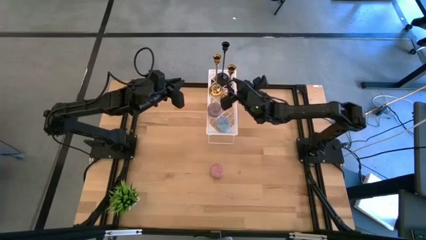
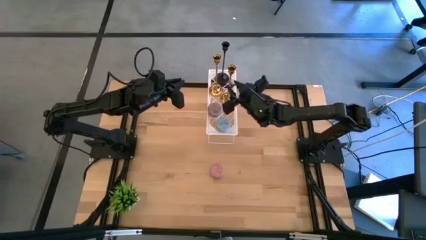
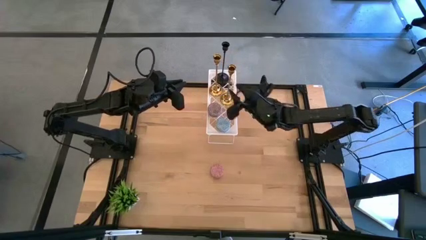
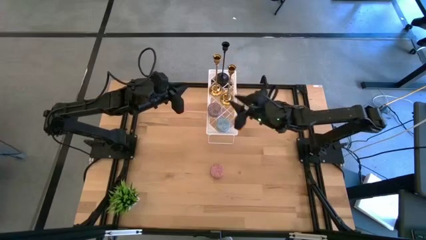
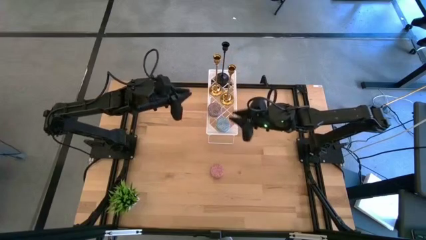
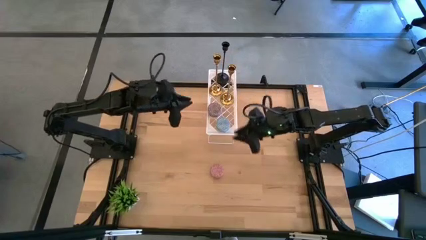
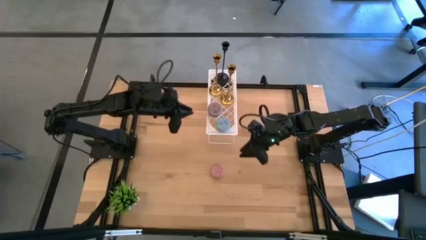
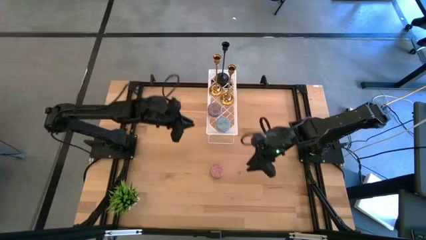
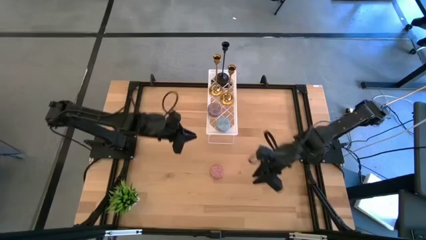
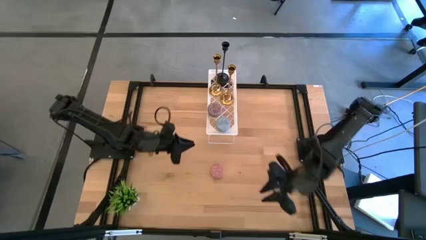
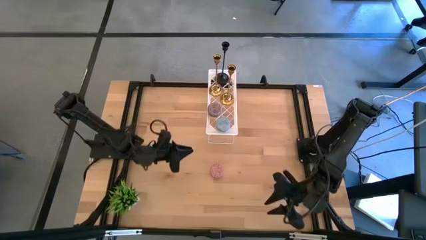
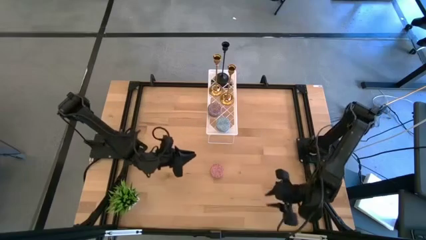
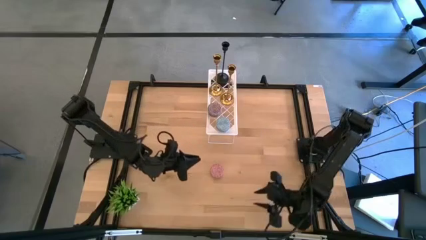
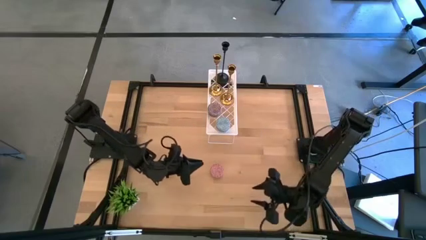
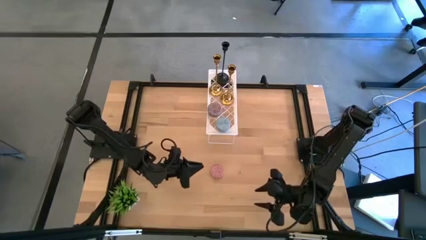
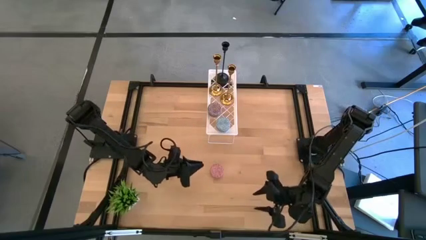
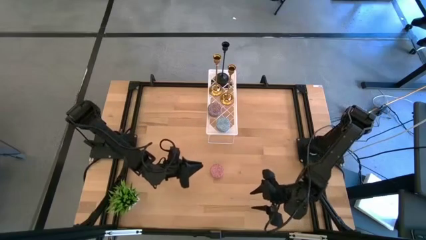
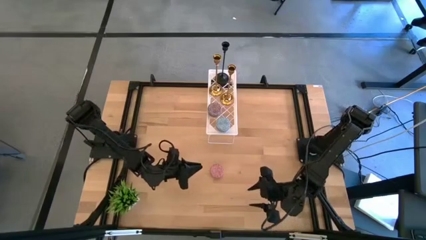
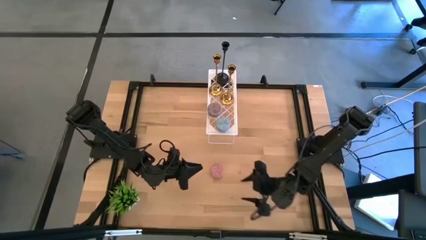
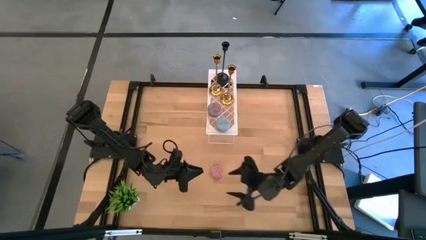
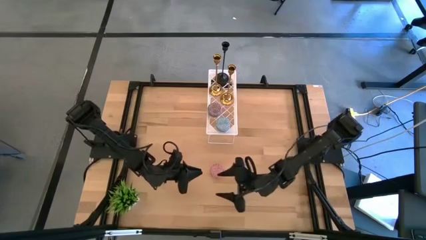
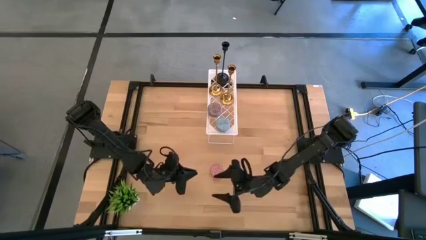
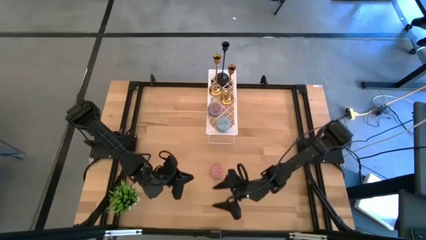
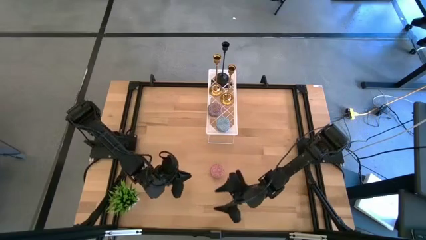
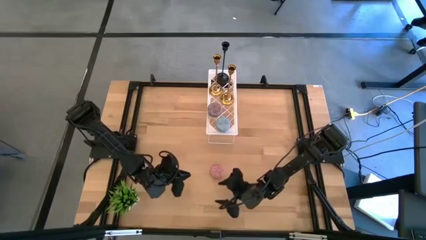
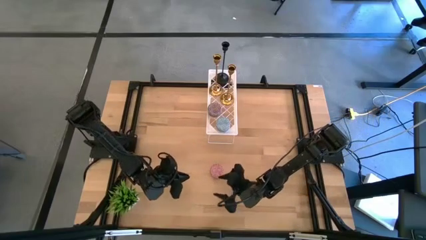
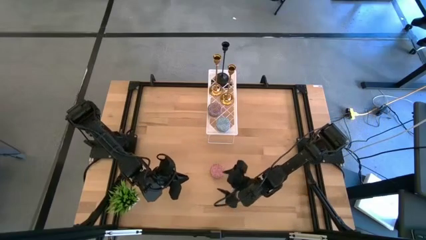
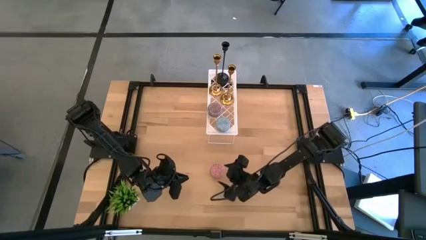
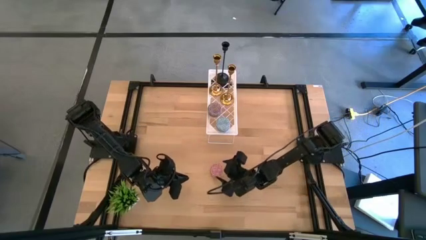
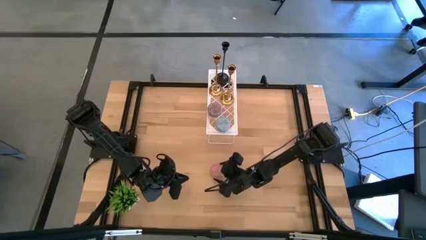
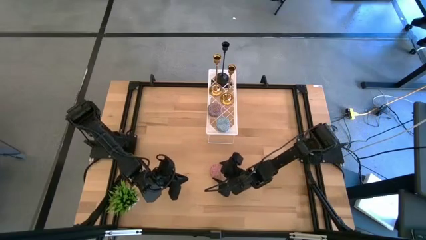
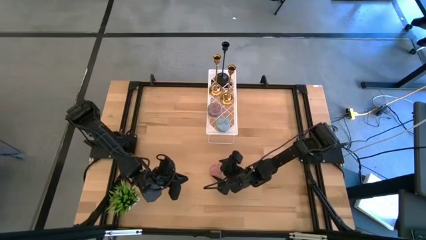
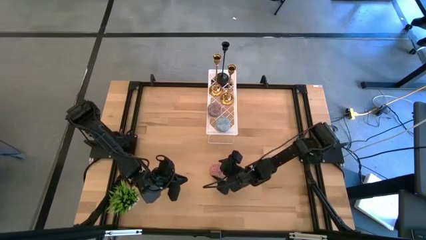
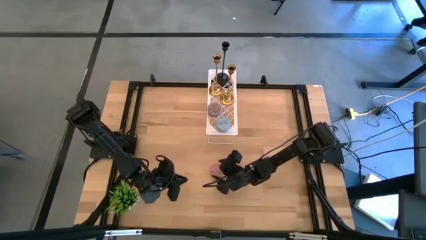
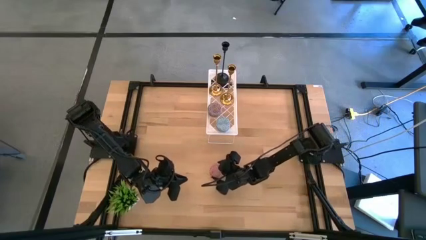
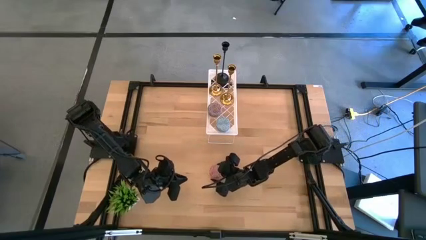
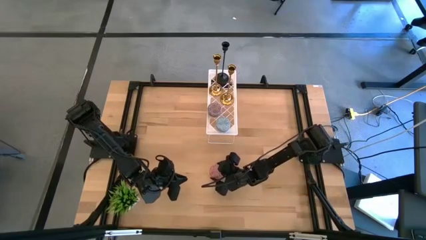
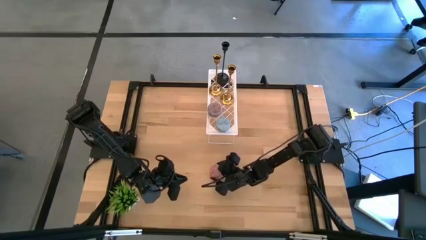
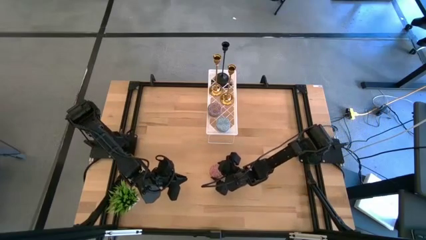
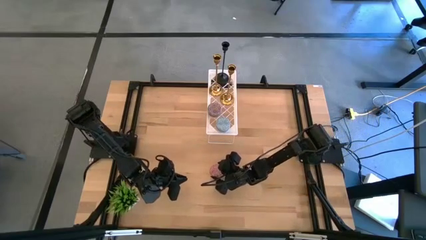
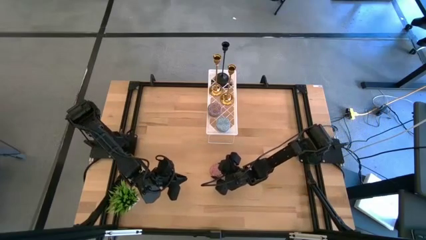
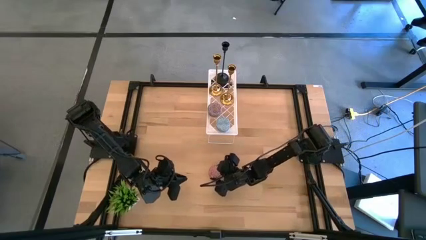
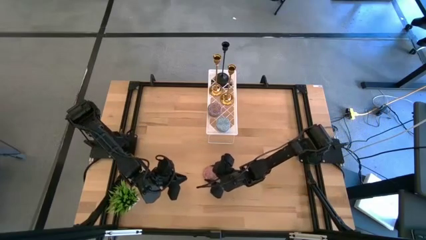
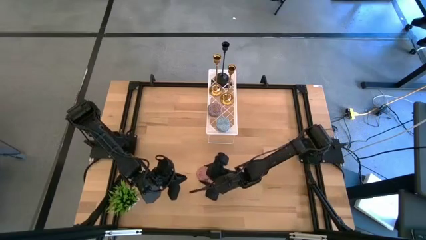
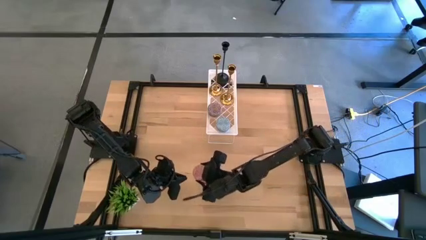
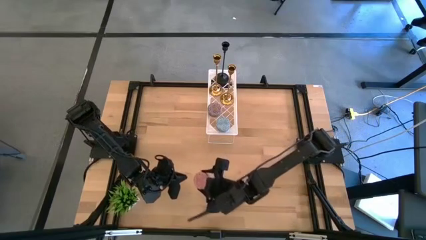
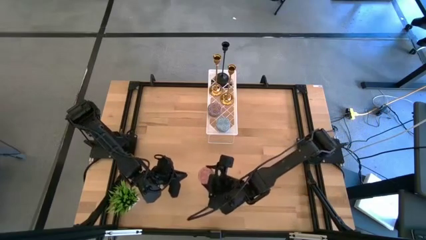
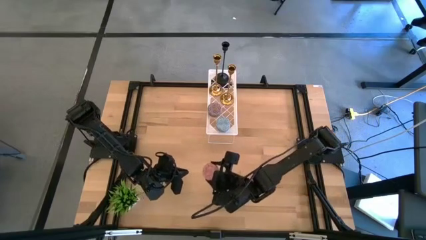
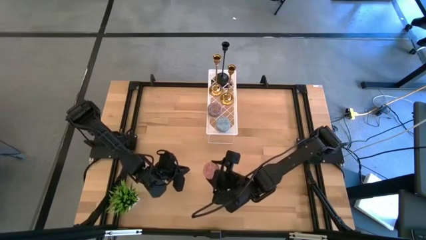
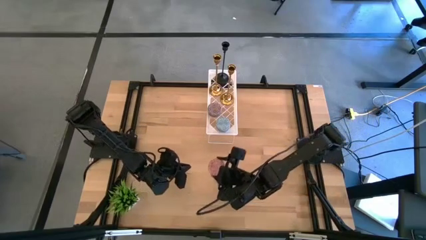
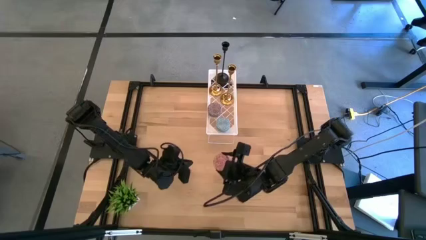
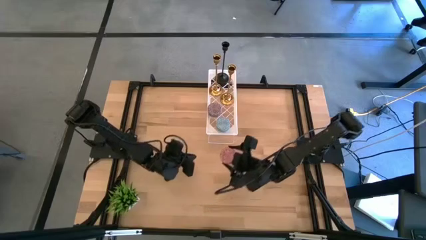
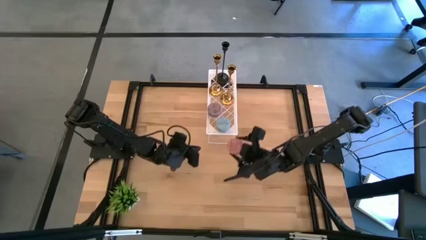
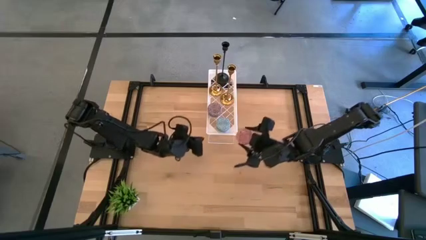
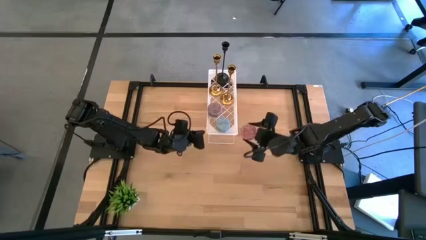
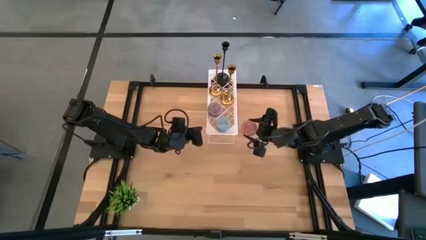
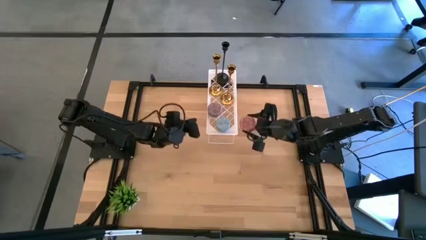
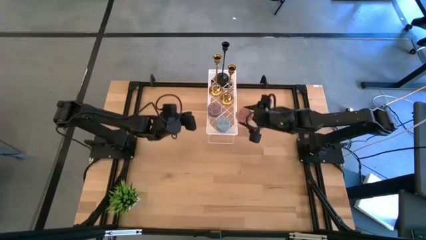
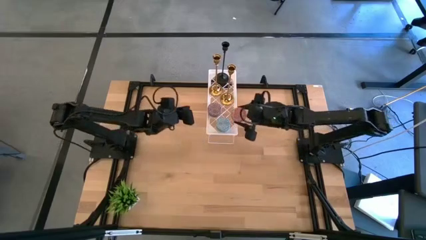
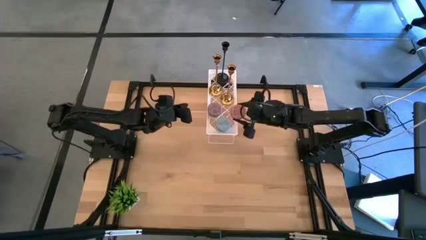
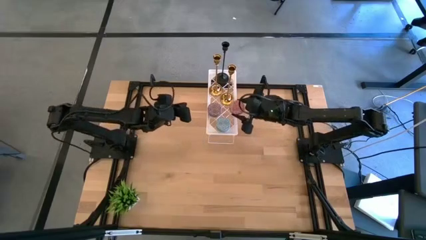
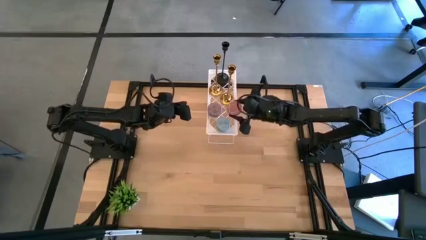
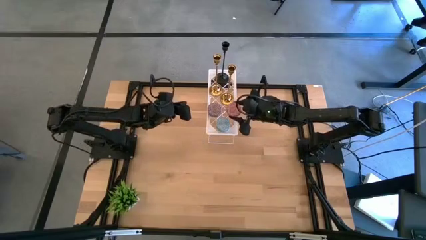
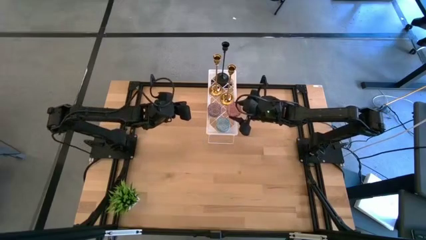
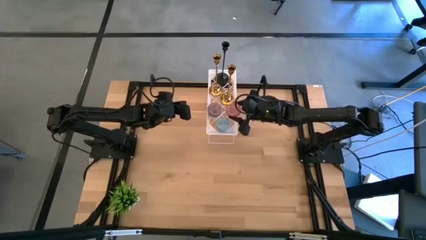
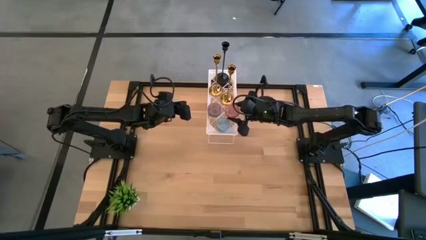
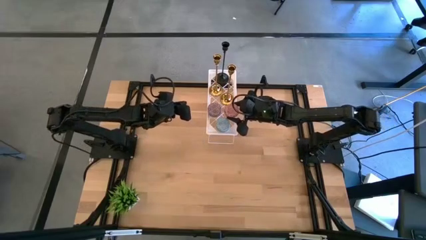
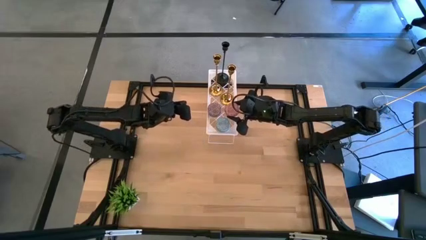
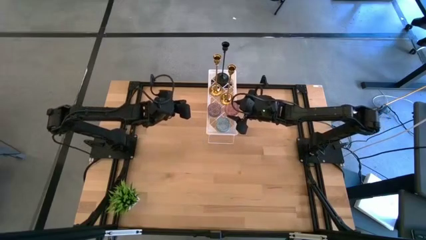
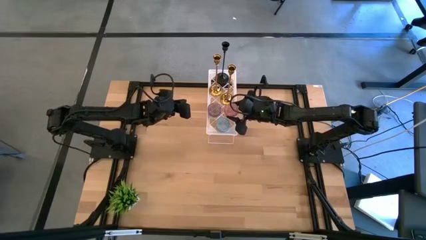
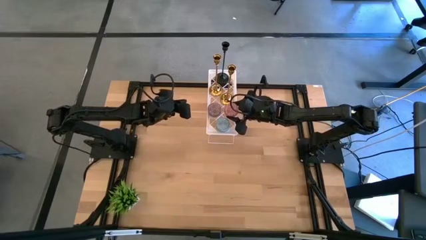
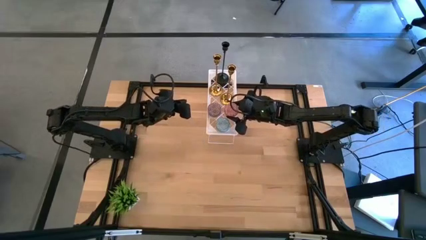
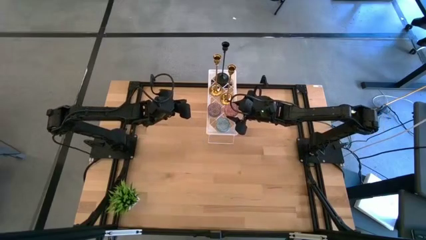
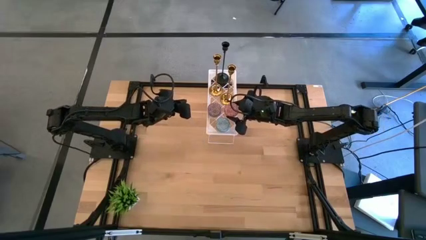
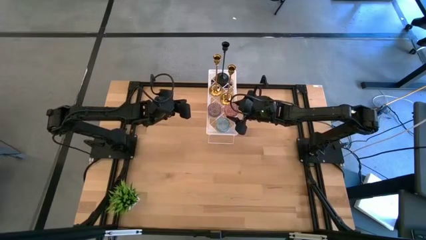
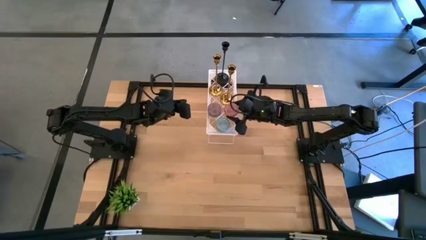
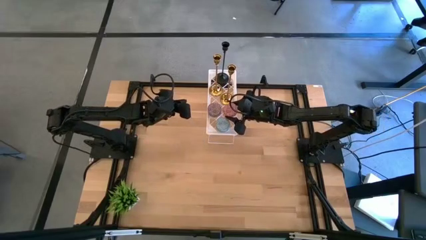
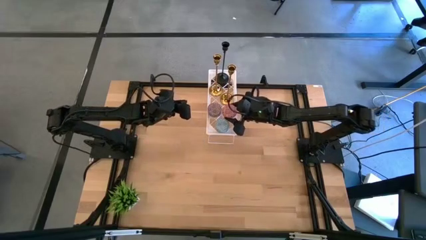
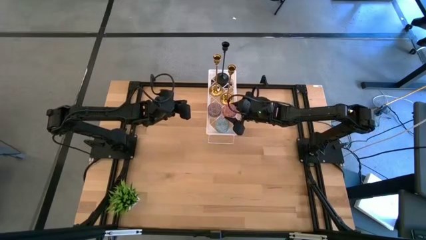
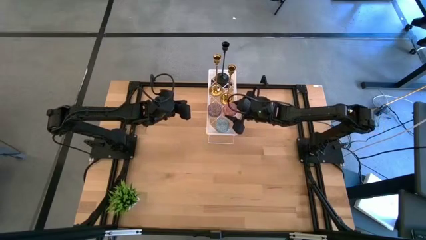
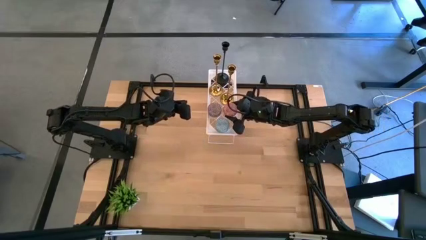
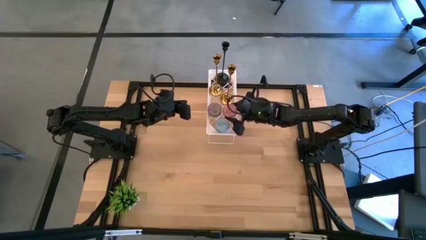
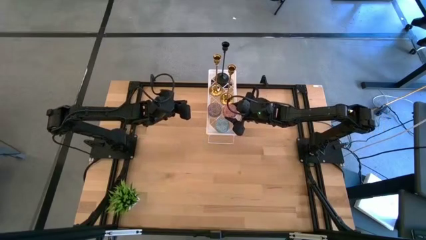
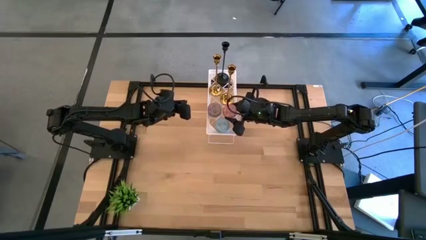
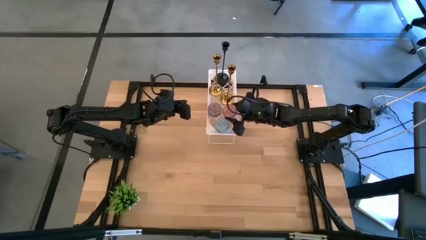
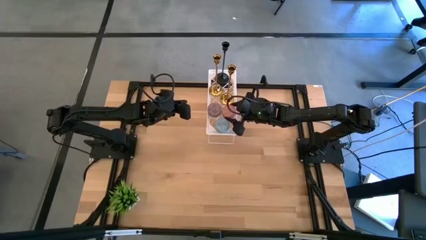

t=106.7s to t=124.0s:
Task: Pick & Place candle stick holders
Put the pink scented candle on the shelf
